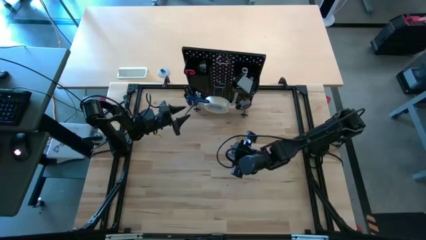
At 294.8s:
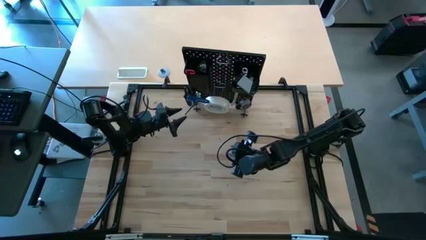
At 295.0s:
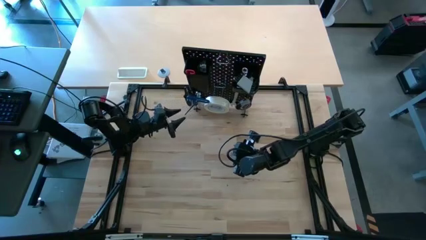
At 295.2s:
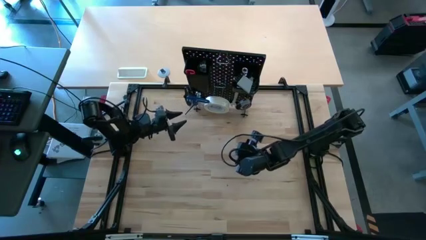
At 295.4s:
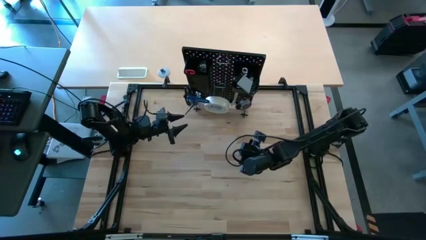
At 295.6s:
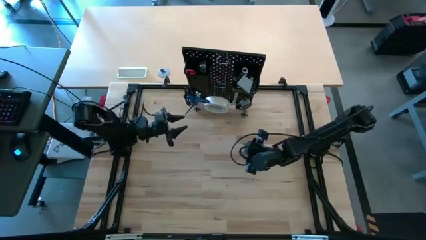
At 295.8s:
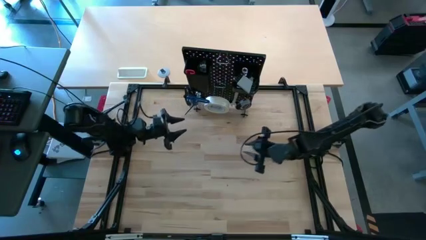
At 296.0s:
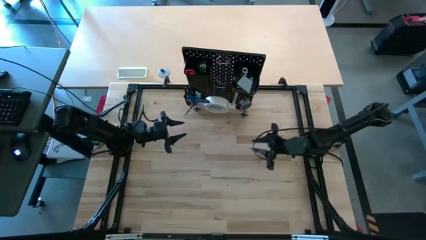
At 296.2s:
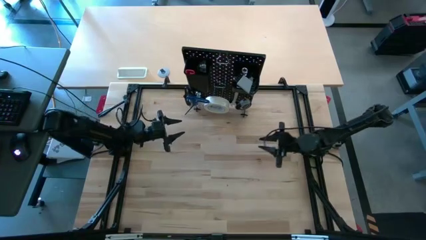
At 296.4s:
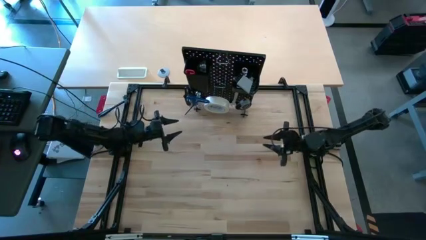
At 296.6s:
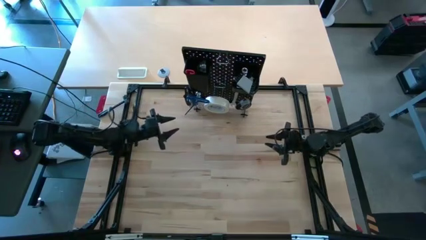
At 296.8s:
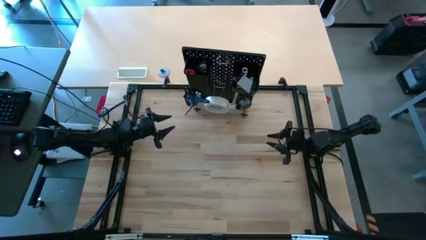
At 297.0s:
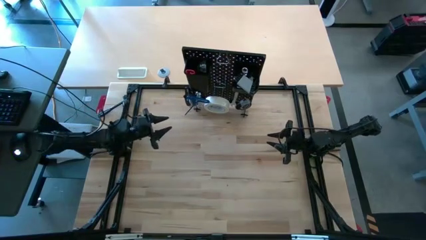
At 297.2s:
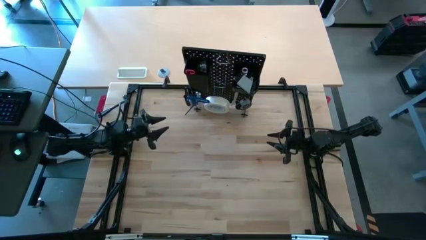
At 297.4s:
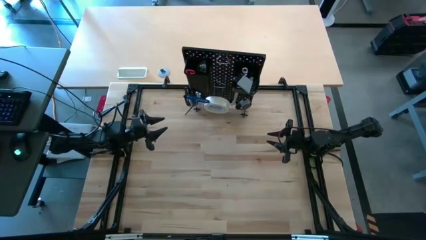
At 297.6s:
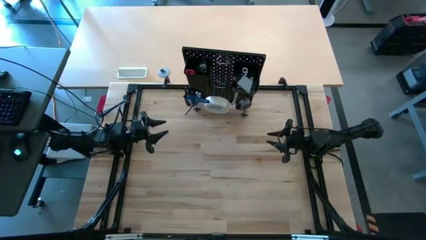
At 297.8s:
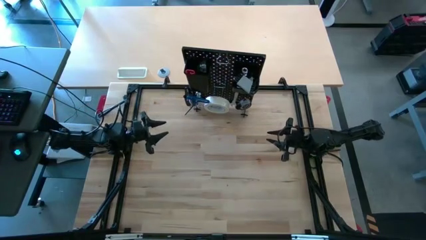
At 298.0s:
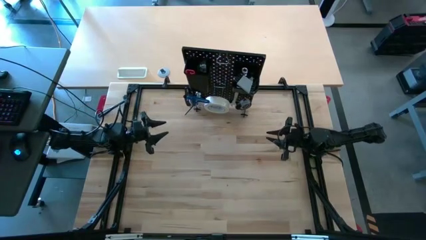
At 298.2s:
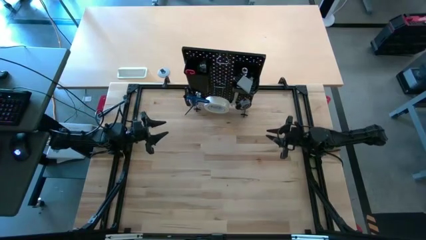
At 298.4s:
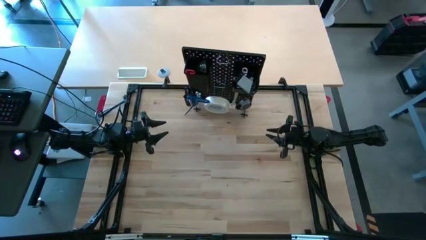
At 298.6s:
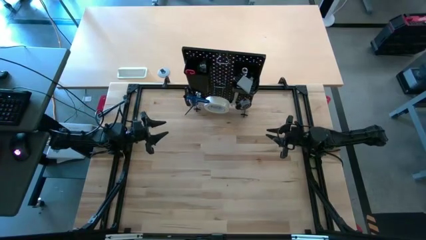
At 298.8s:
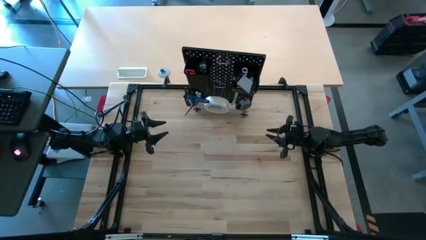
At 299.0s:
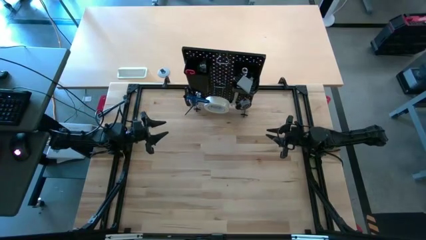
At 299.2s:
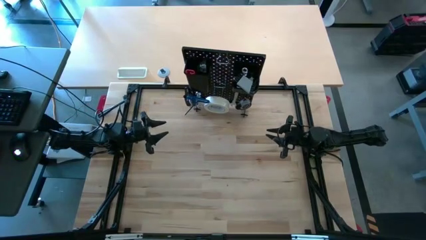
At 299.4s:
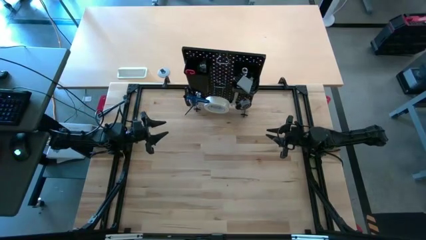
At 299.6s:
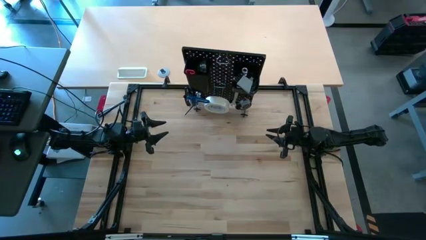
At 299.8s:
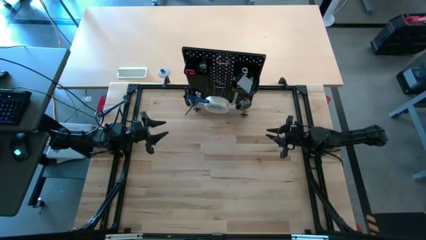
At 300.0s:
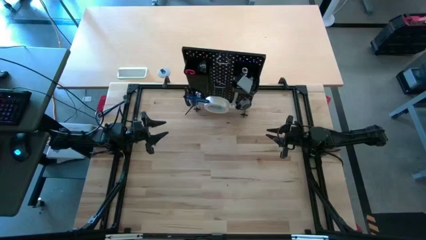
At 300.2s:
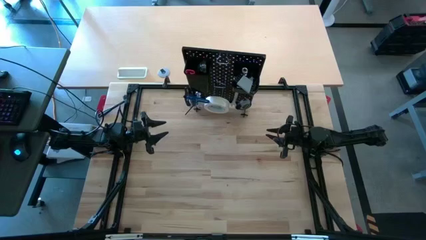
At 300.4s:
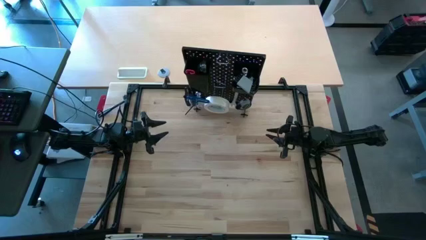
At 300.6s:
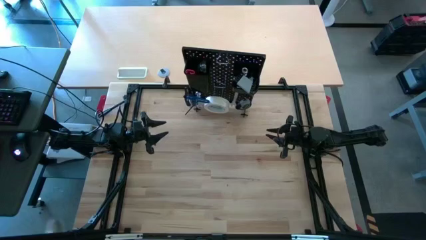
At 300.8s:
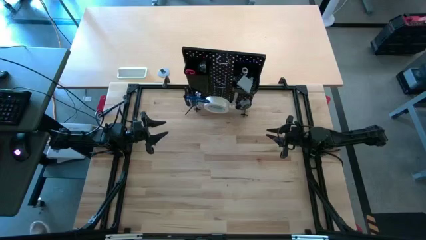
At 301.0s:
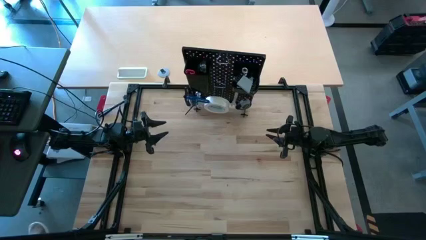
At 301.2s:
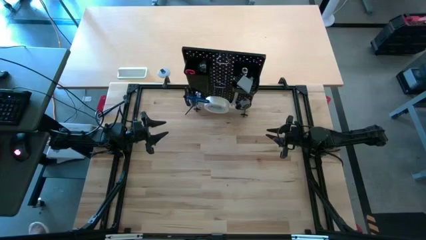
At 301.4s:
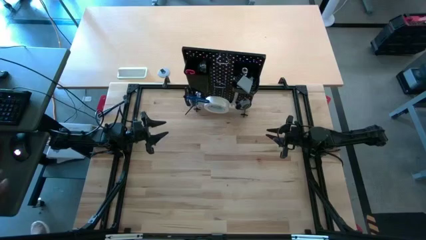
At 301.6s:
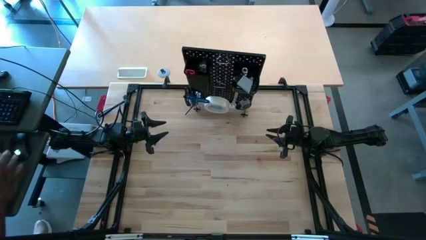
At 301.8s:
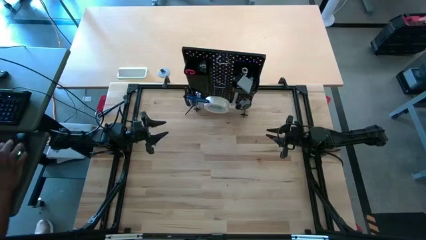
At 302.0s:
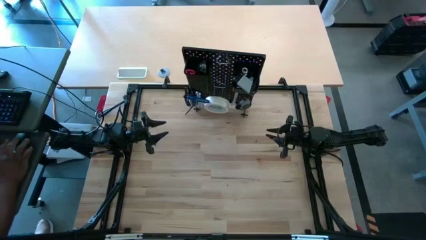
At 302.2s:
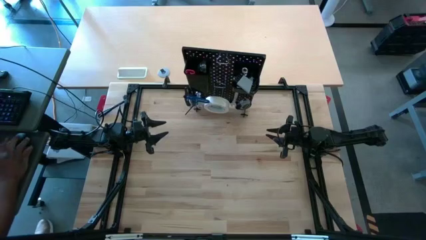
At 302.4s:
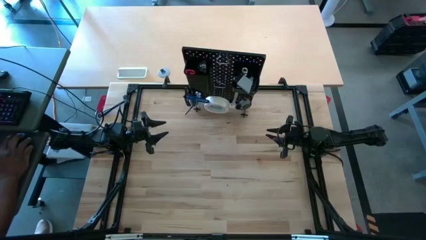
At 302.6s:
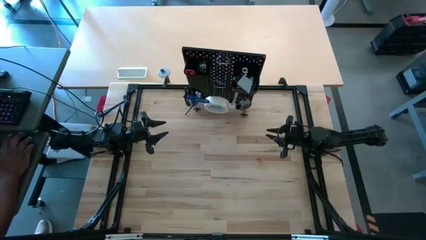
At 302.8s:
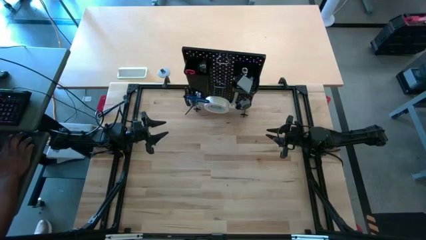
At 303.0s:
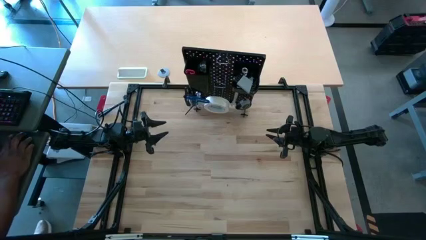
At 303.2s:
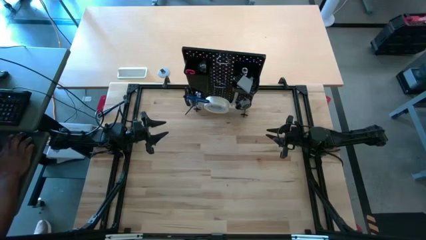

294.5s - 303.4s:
Task: Hang tools onto peg board
Return to Home Position

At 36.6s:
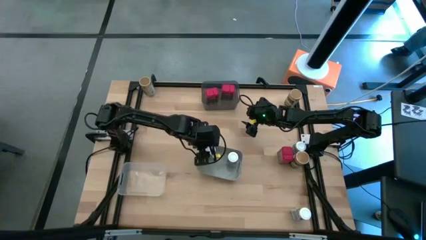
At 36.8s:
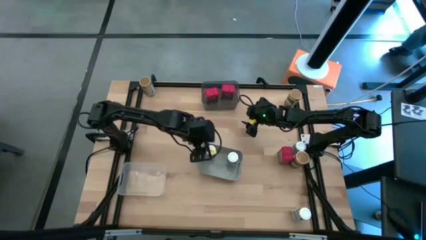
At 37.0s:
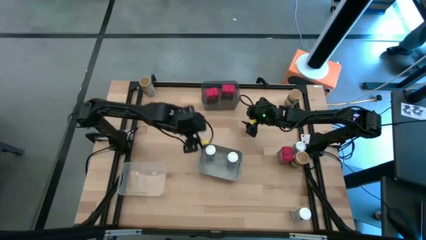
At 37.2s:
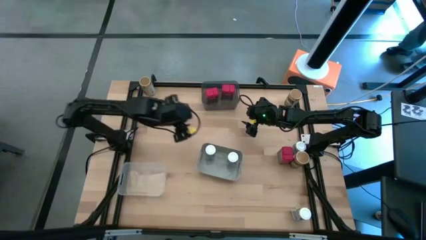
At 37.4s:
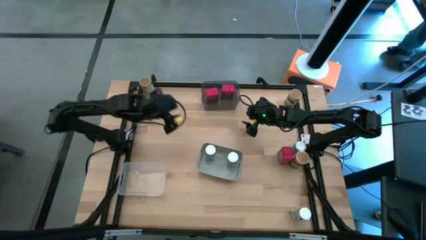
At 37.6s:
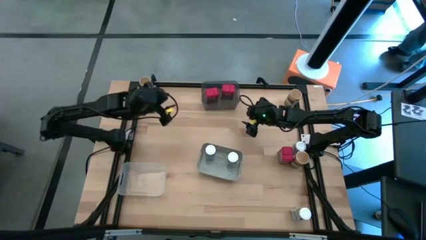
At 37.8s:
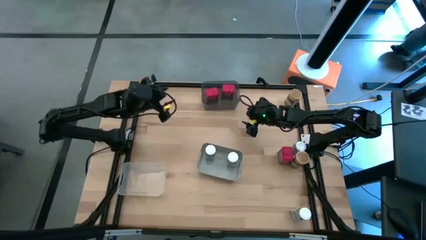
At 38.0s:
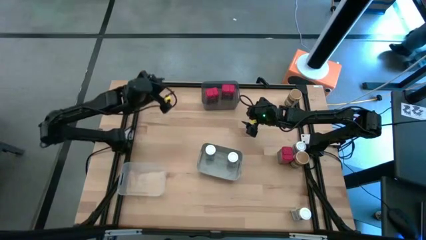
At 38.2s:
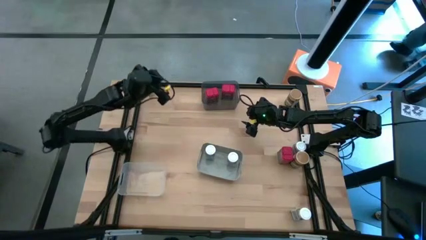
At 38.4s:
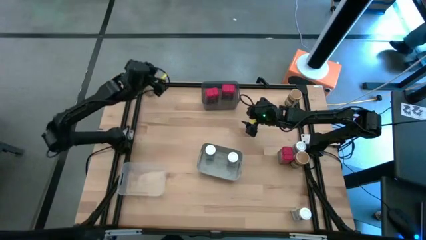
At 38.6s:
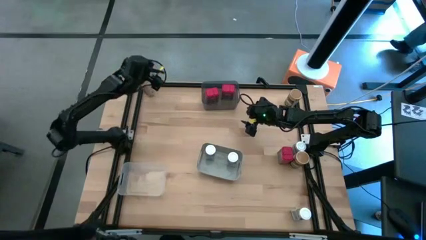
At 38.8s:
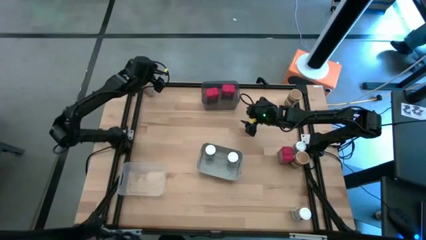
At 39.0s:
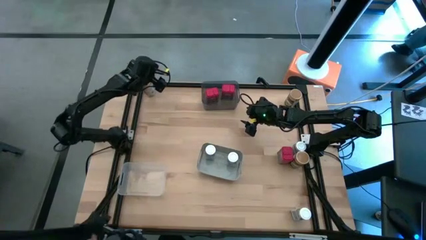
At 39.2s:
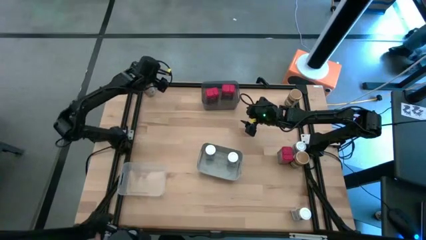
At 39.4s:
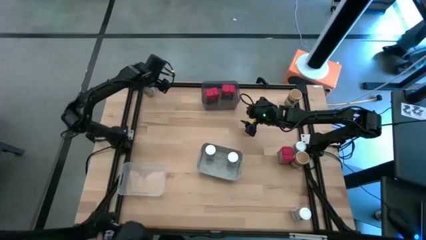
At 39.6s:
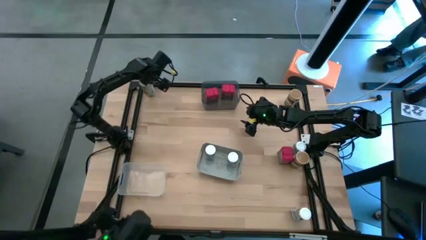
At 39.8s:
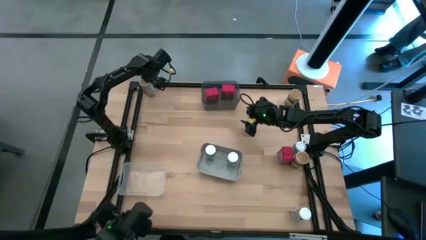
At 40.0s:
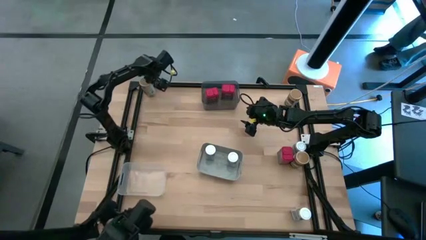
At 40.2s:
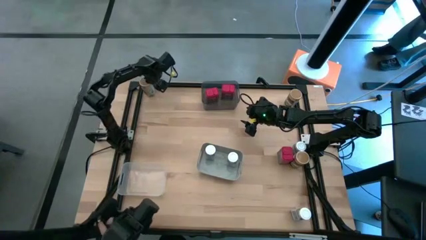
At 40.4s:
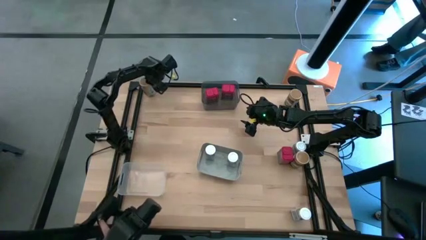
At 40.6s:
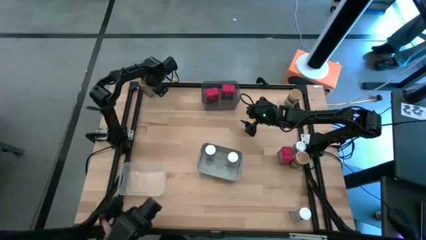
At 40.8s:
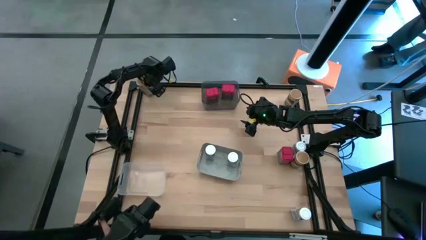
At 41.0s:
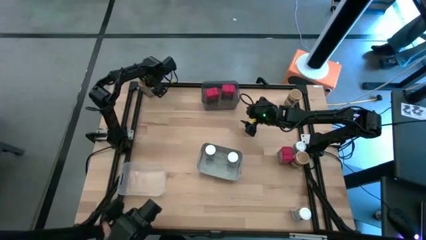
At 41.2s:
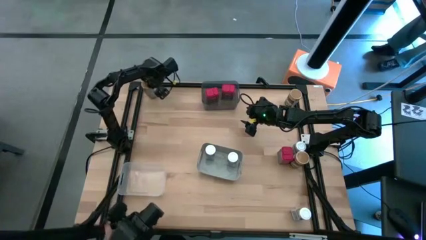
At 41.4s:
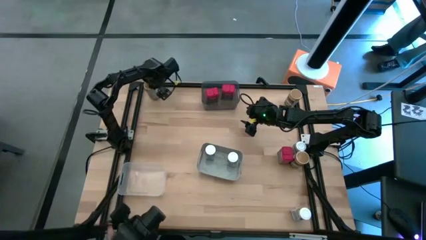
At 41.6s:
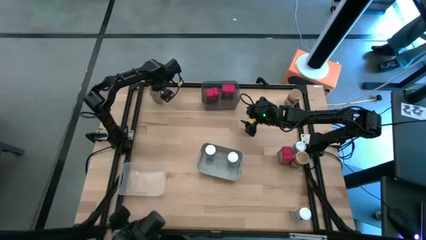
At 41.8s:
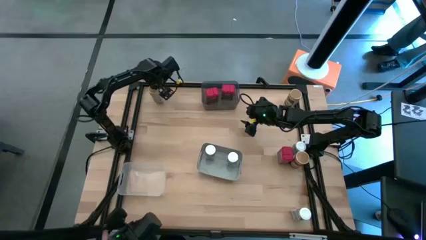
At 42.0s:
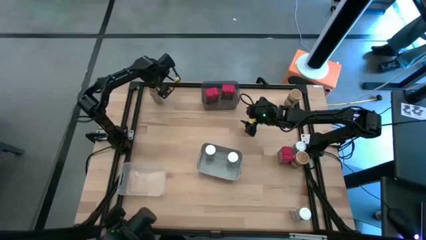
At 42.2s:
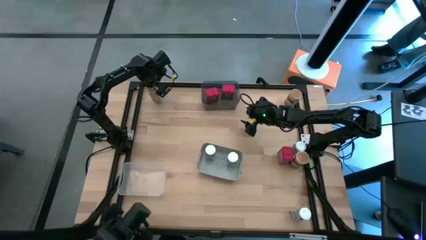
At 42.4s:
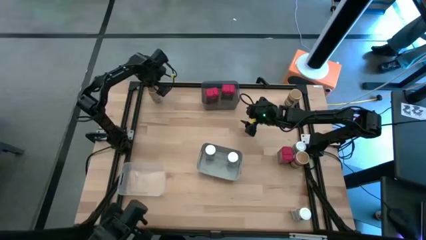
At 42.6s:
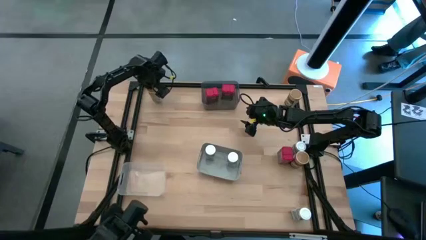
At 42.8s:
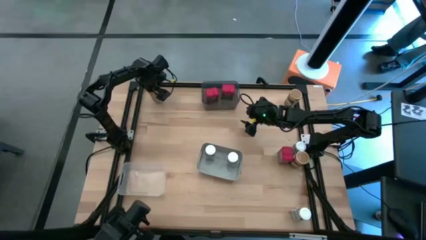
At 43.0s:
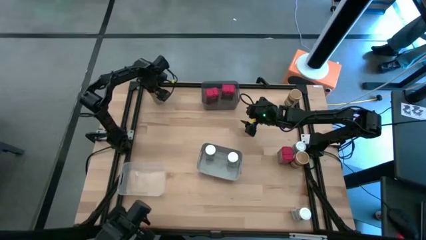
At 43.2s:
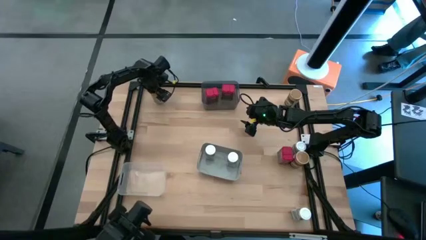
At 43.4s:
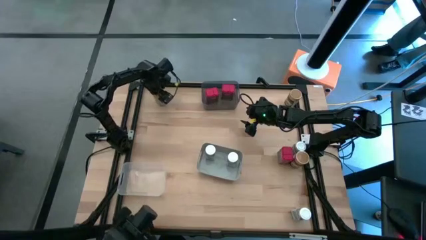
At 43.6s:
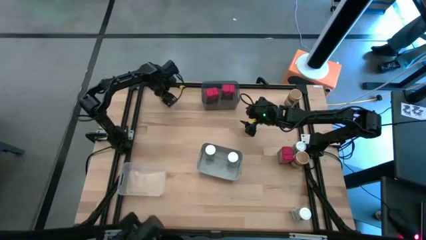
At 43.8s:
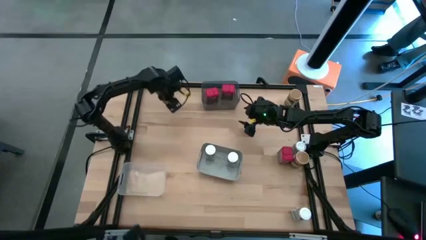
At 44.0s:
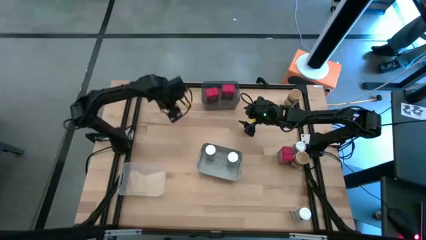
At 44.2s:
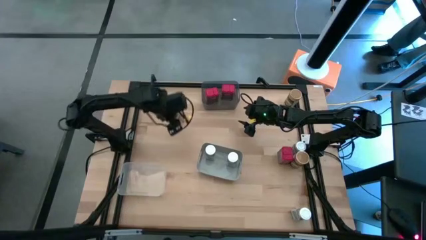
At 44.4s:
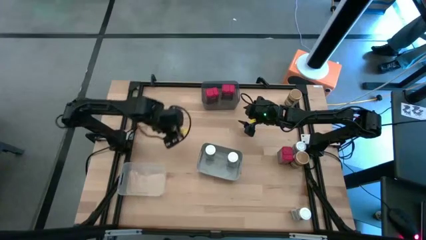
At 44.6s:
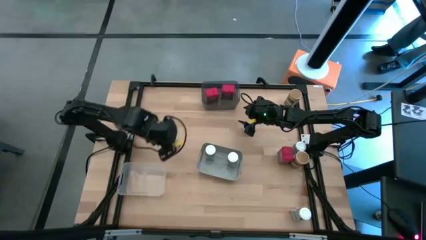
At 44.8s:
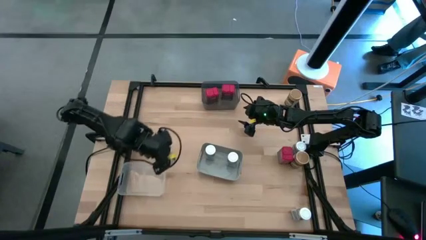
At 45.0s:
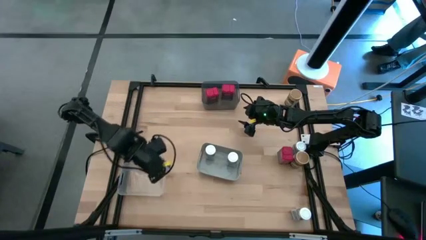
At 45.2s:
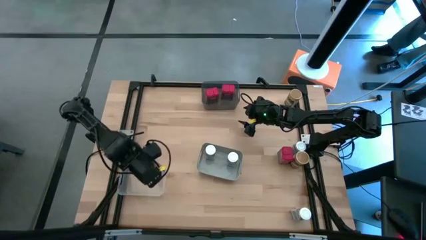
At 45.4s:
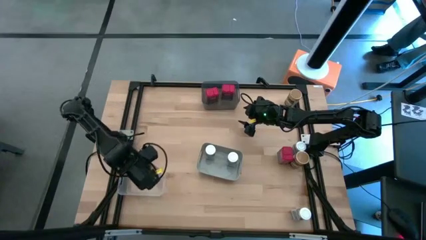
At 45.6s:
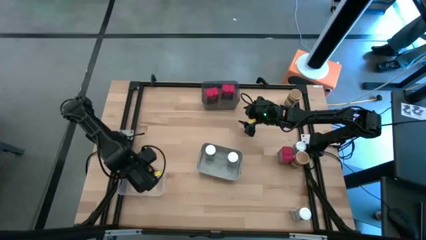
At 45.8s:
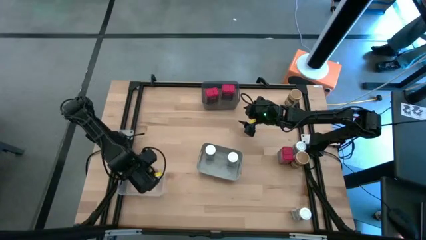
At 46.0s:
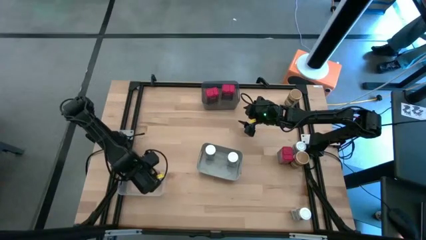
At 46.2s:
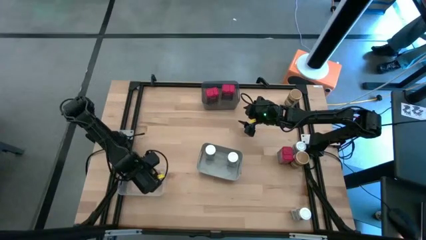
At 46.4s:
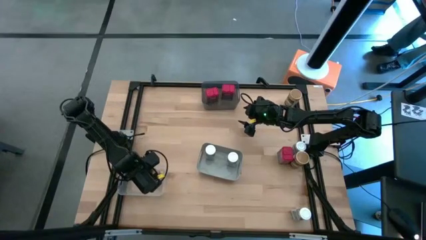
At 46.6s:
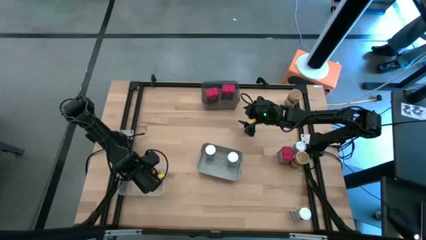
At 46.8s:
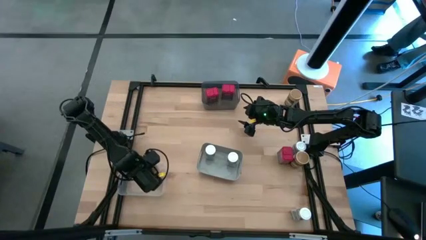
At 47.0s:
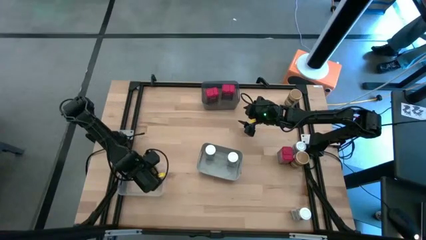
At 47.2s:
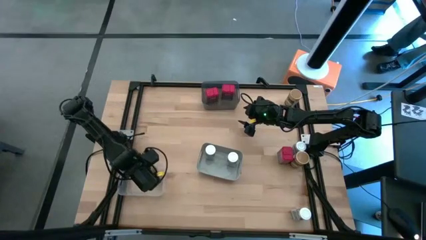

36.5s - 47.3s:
Task: Sort spices by type
Put the top left brown seasoning bottle into the transparent bin
